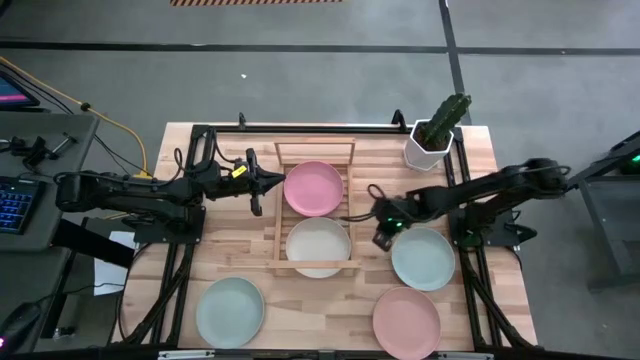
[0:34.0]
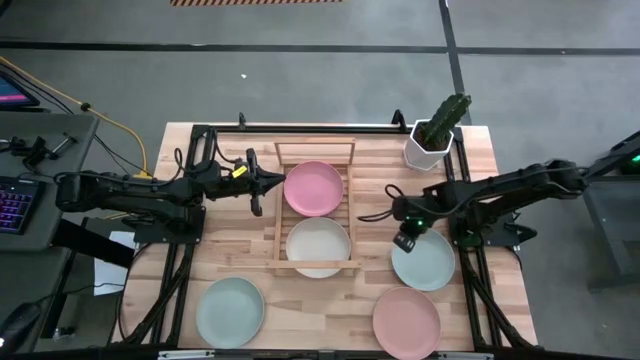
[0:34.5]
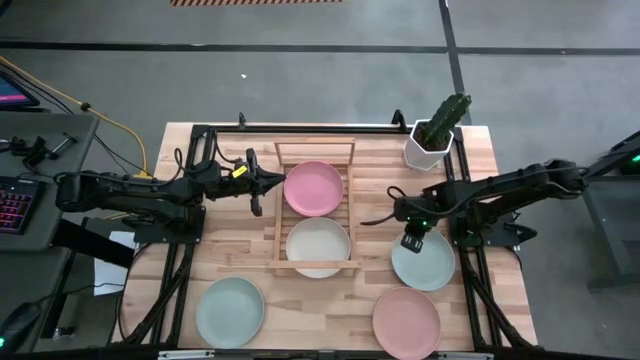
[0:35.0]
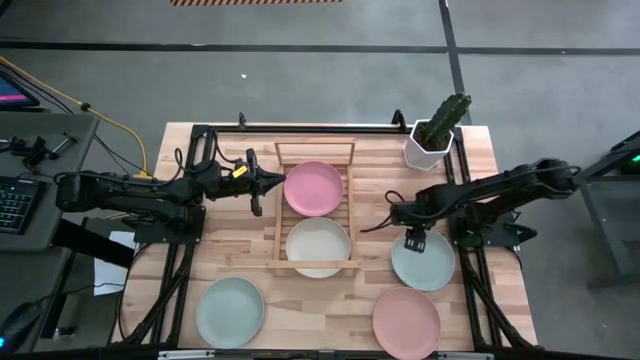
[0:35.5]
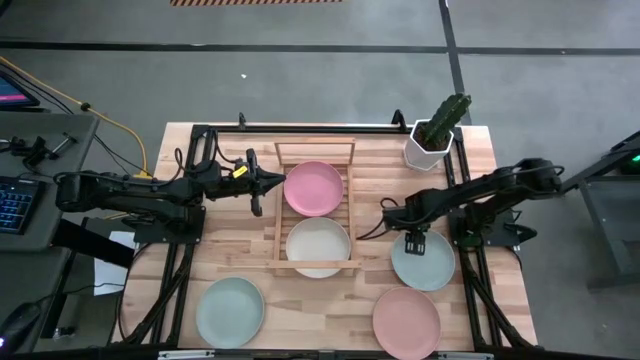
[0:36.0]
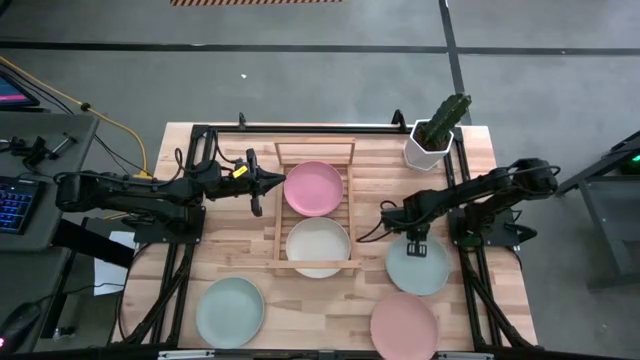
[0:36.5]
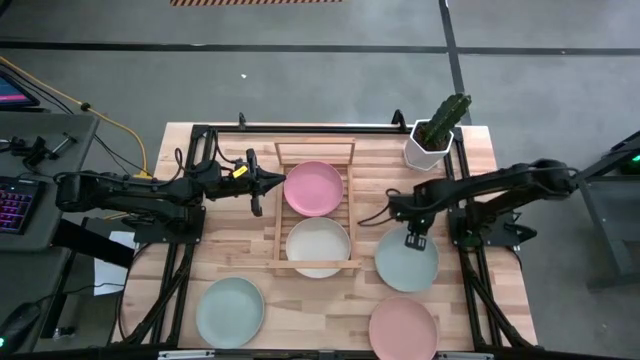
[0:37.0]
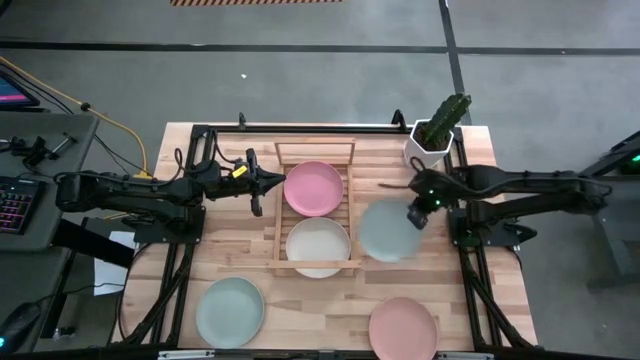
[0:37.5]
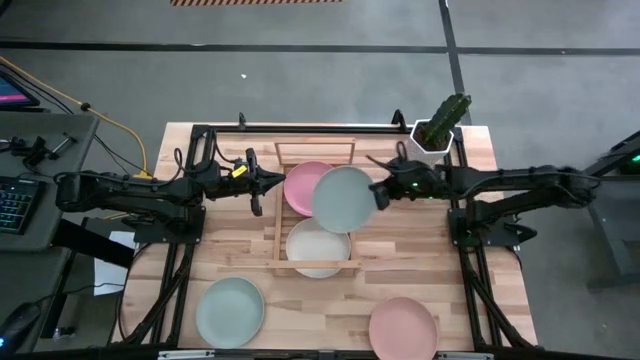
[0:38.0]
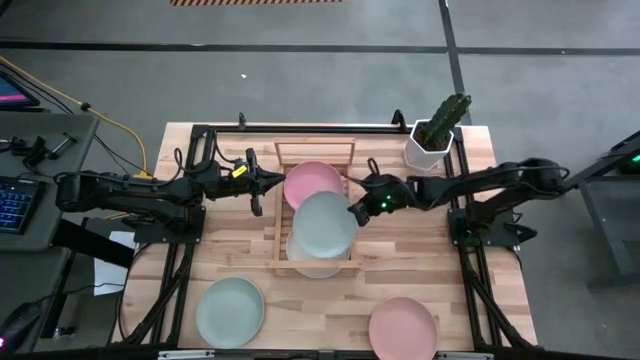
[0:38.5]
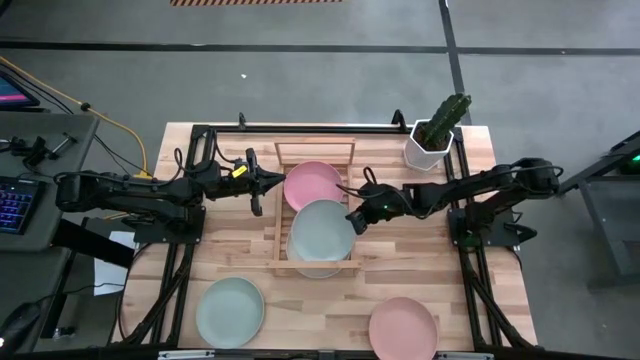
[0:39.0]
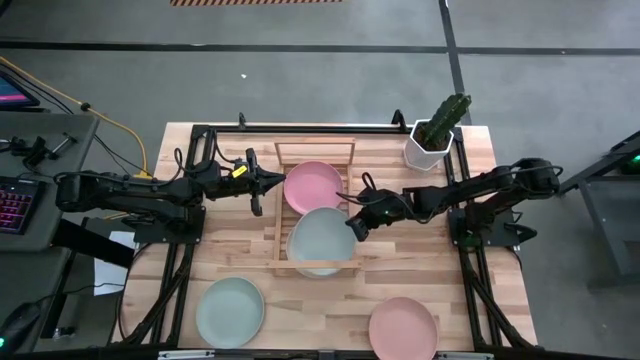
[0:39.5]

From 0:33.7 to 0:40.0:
Task: Place and stack plates onto a shelf
Stack the right blue plate on top of the gray plate on the shelf

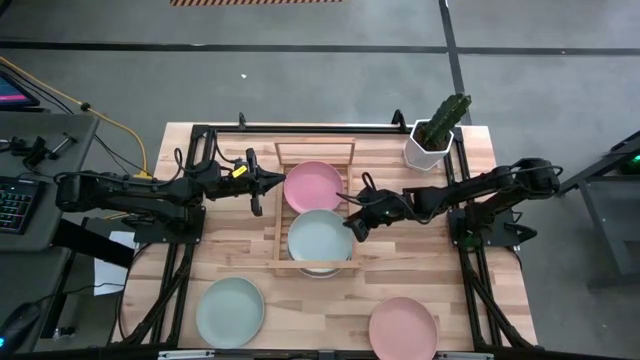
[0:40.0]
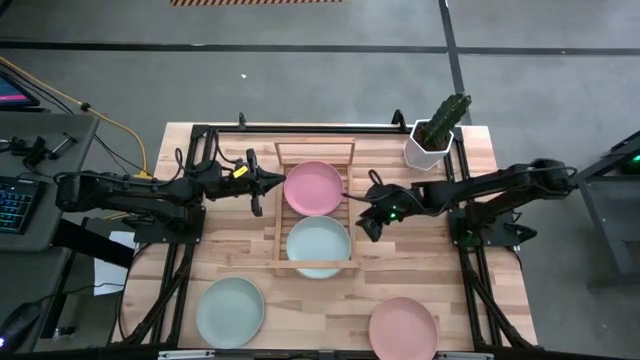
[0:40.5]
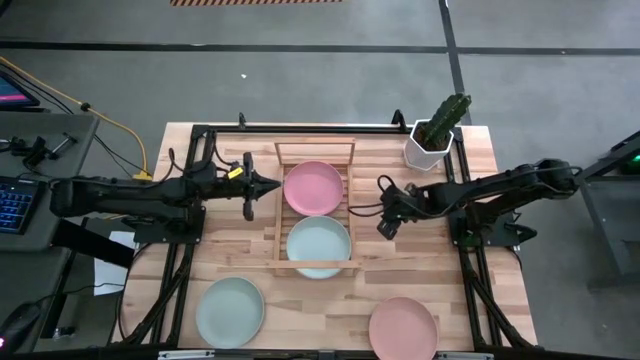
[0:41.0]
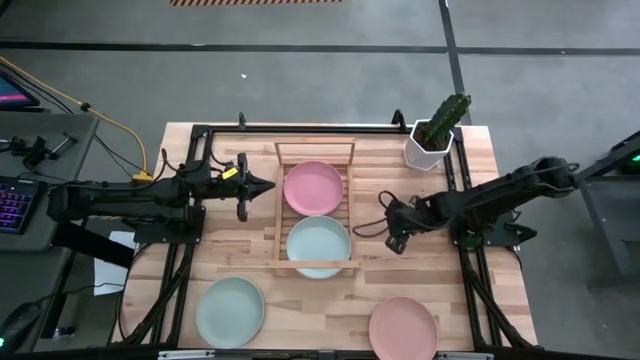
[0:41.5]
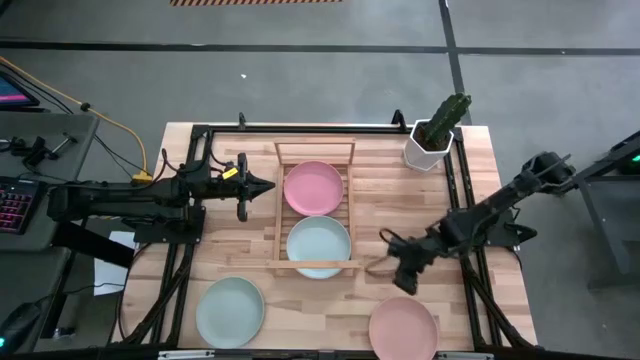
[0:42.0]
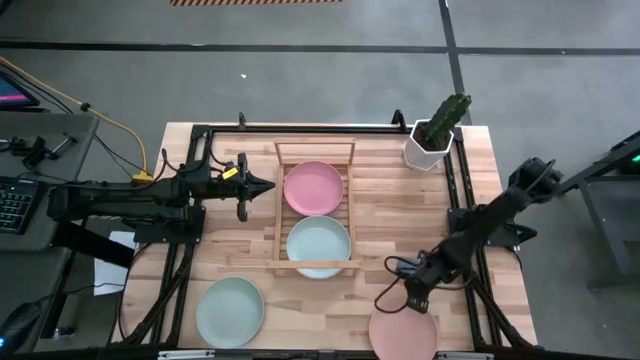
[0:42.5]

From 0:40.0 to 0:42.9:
Stack the light pink plate on top of the pink plate on the shelf

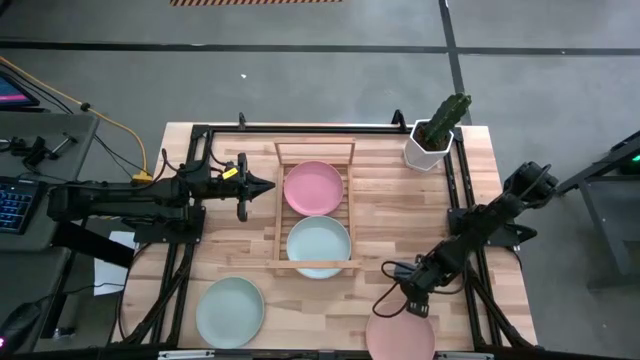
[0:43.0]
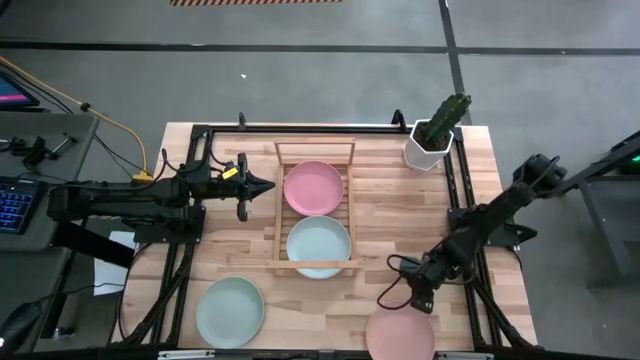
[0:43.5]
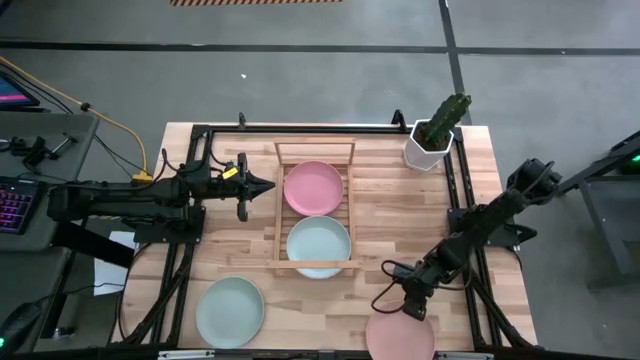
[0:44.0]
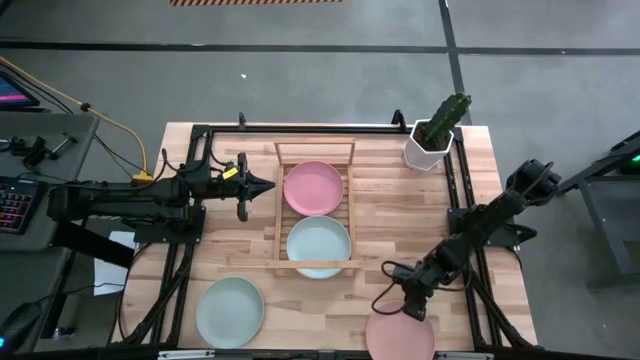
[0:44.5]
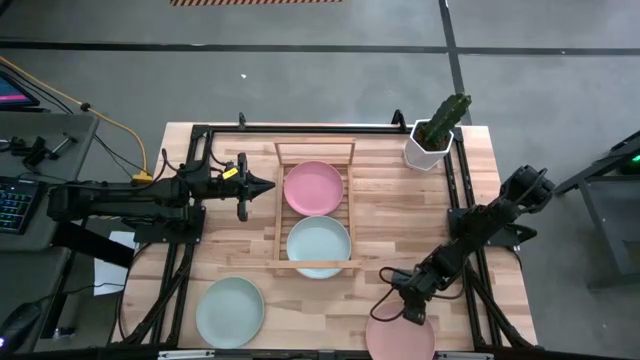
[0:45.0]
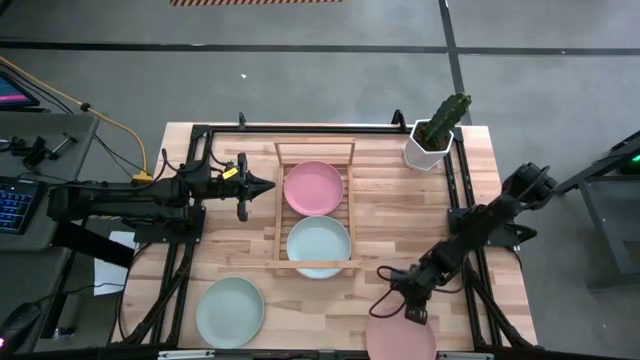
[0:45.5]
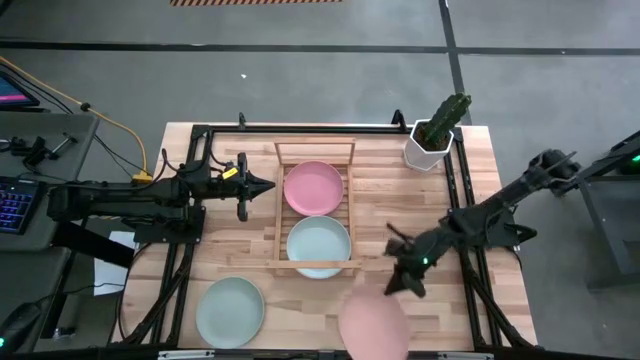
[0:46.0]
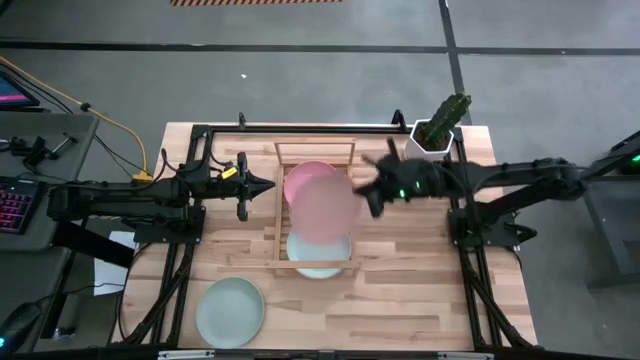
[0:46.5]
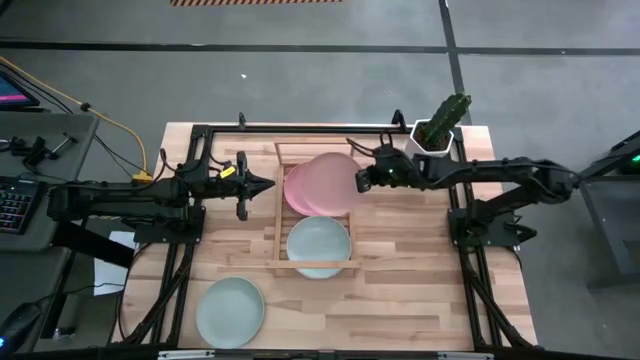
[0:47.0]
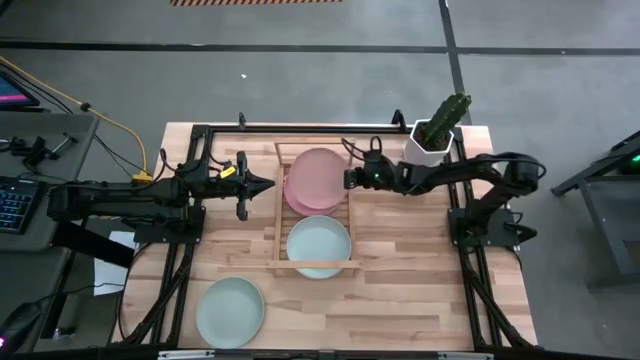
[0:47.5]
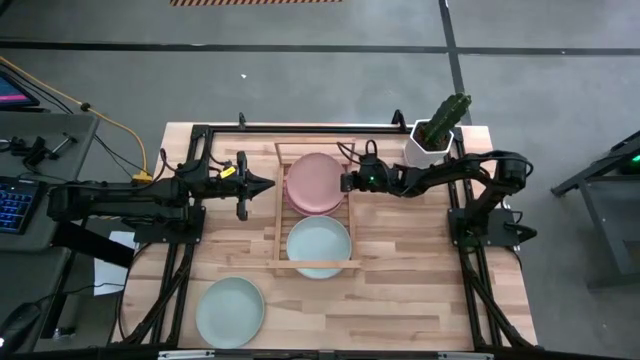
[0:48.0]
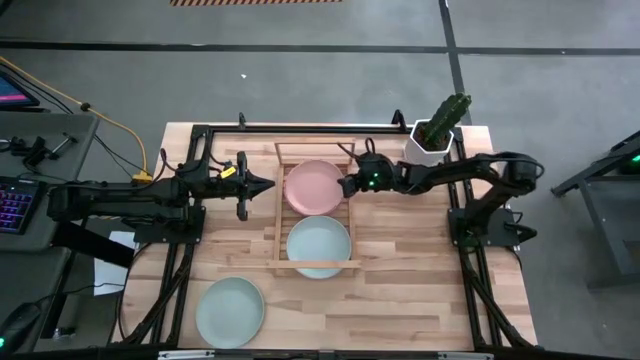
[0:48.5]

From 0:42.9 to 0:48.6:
Stack the light pink plate on top of the pink plate on the shelf

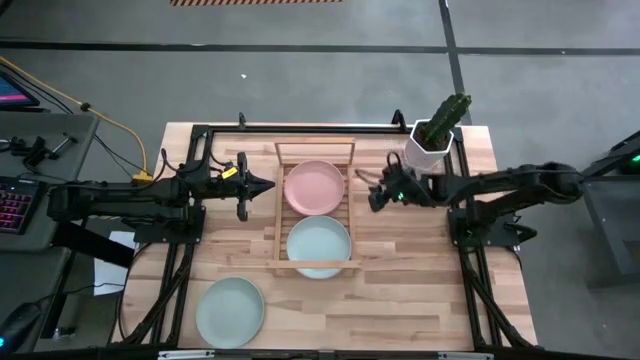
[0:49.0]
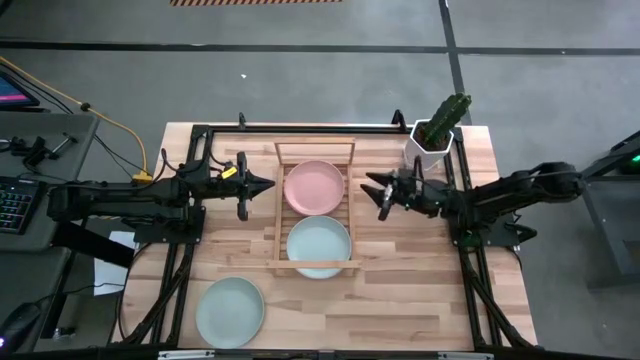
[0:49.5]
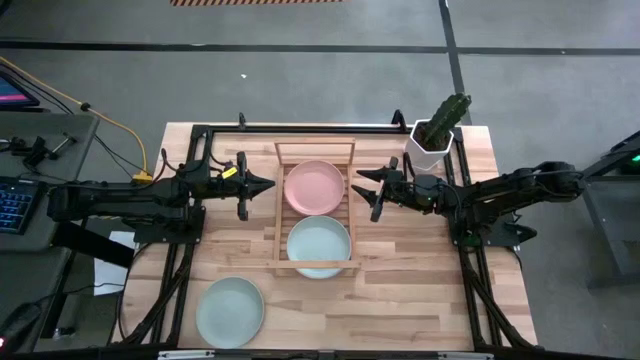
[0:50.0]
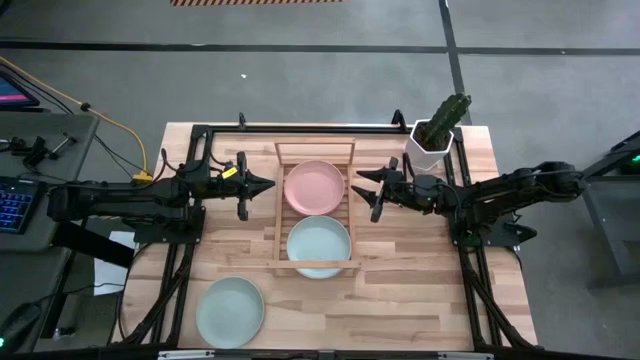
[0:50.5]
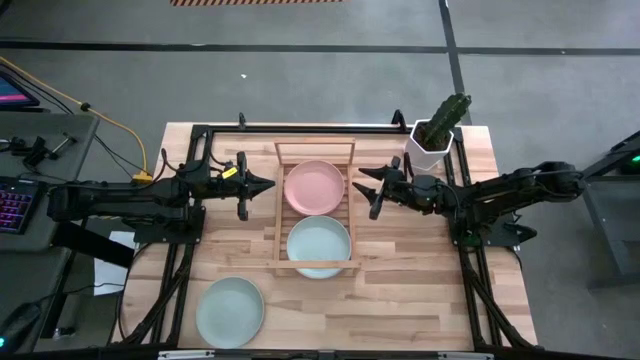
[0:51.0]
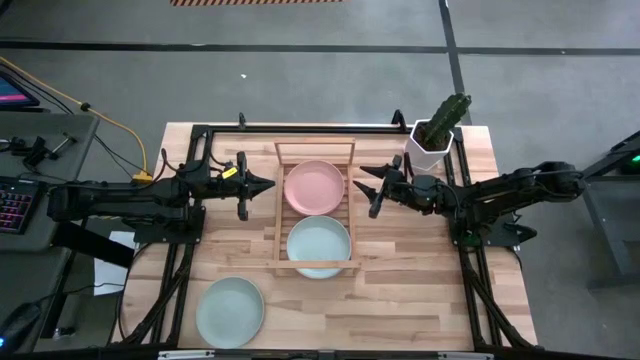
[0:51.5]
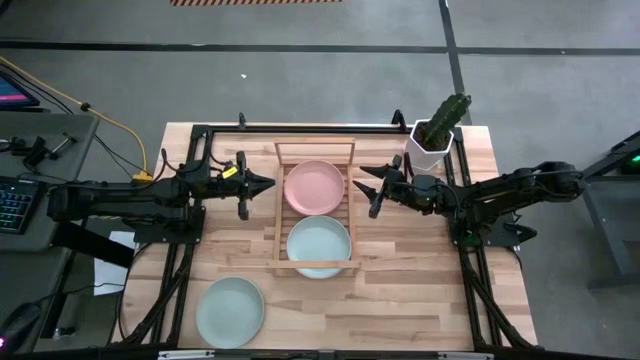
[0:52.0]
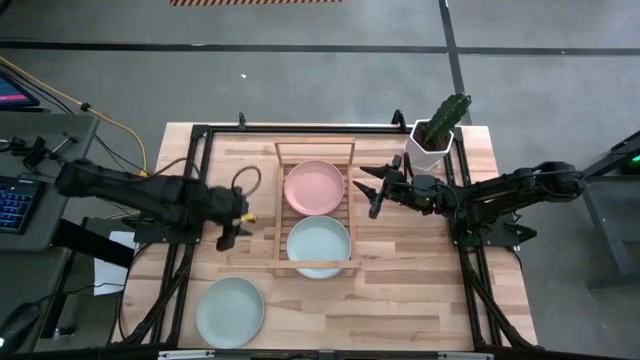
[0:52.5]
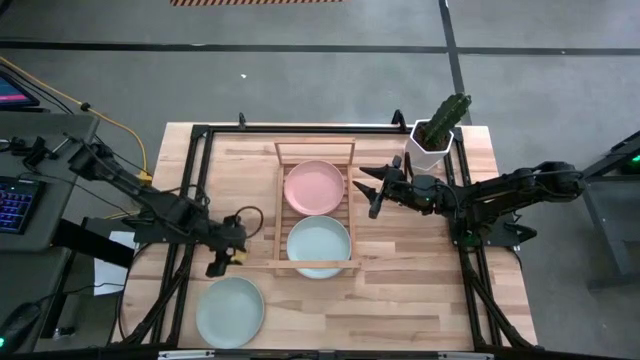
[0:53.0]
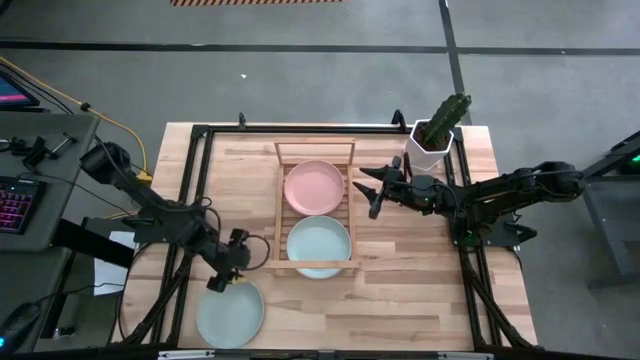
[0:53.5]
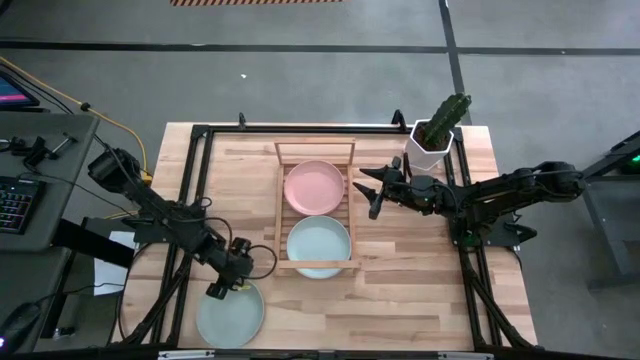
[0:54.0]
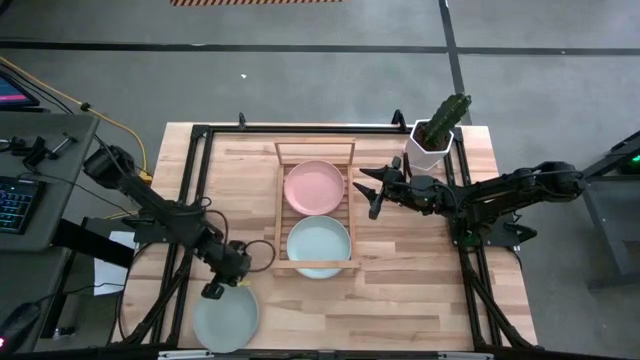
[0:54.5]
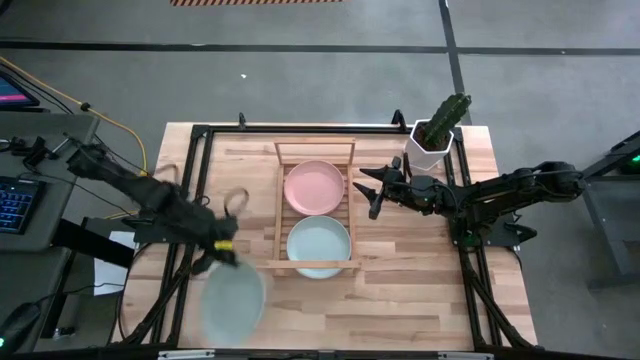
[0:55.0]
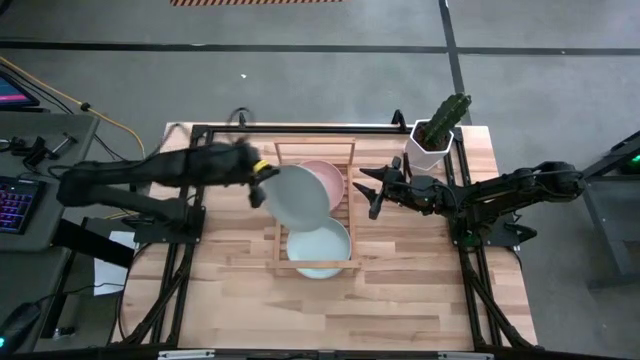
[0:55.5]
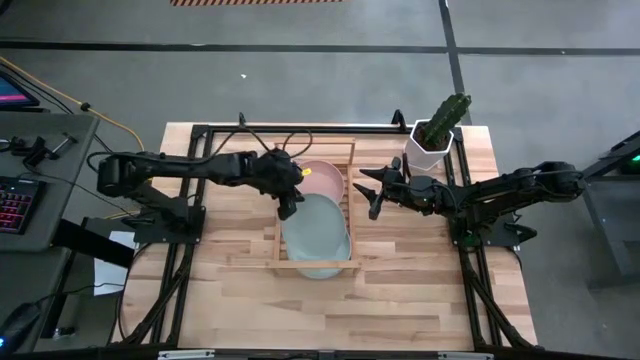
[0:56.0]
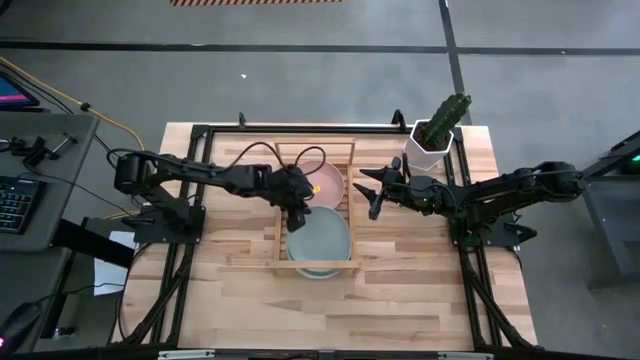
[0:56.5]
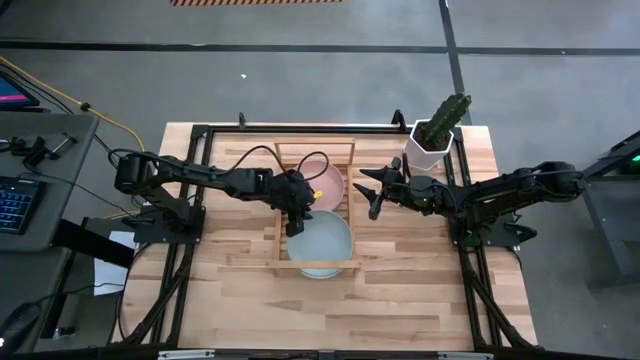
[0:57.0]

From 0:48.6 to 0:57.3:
Stack the blue plate on top of the blue plate on the shelf
